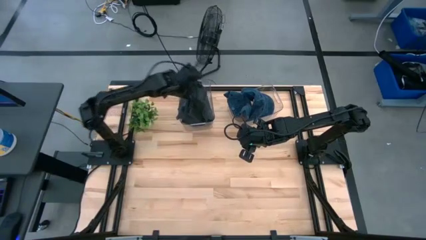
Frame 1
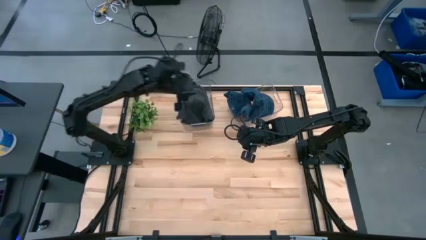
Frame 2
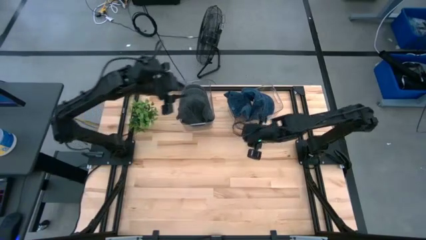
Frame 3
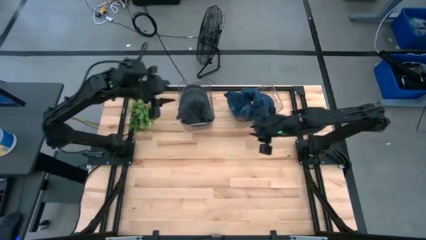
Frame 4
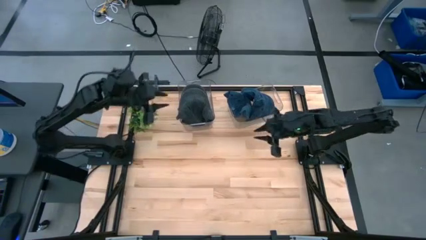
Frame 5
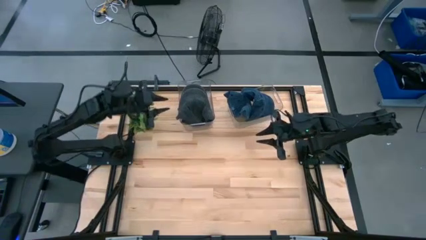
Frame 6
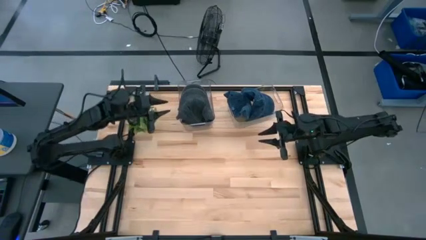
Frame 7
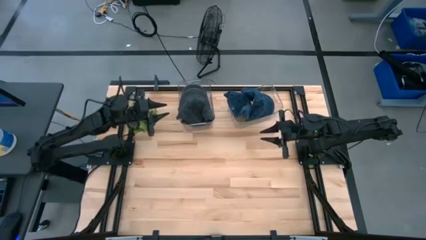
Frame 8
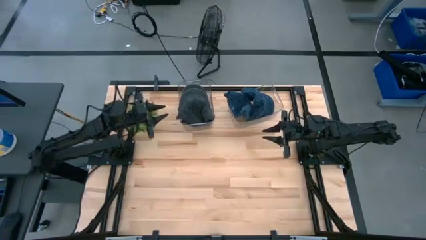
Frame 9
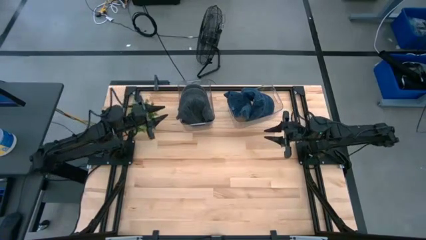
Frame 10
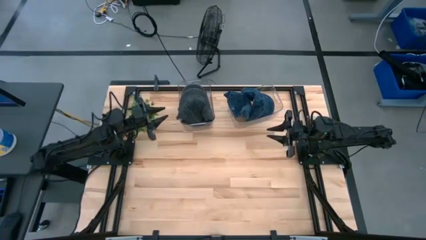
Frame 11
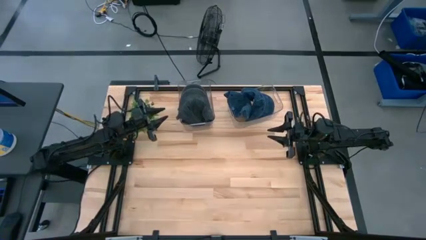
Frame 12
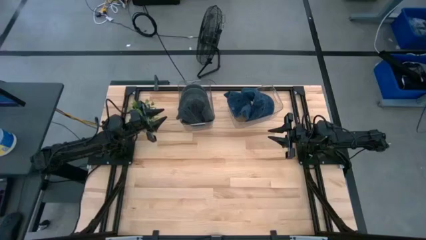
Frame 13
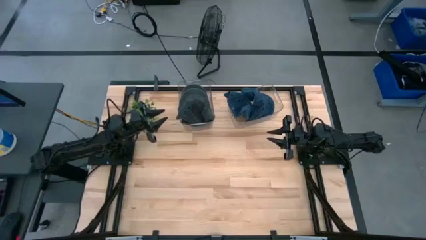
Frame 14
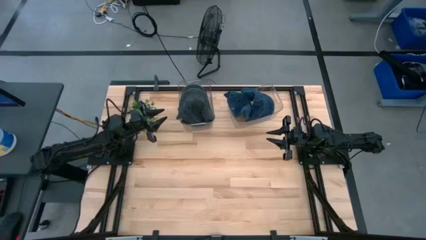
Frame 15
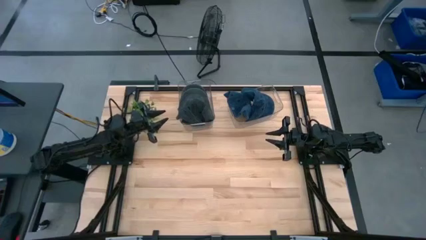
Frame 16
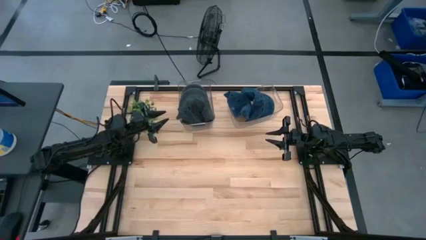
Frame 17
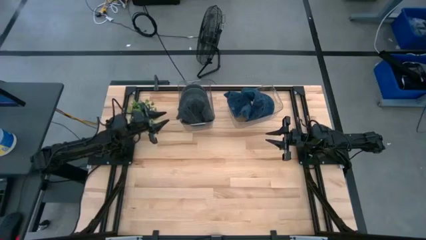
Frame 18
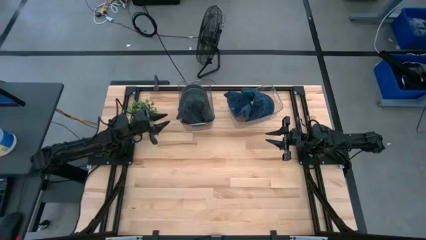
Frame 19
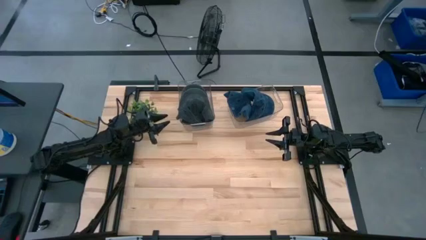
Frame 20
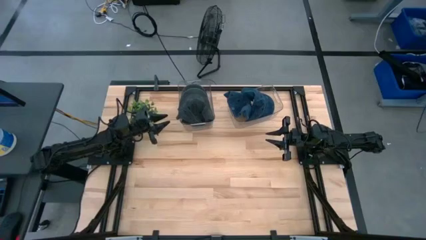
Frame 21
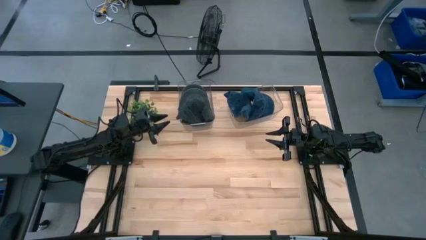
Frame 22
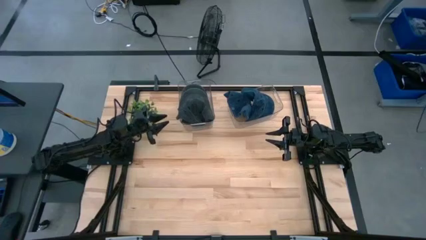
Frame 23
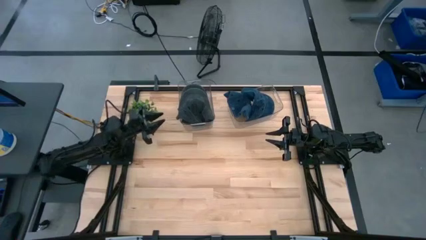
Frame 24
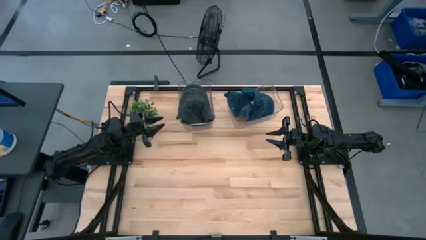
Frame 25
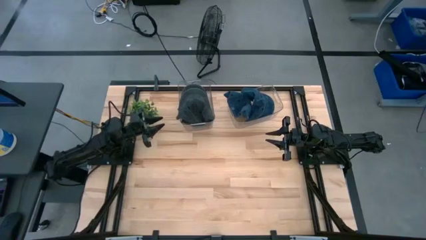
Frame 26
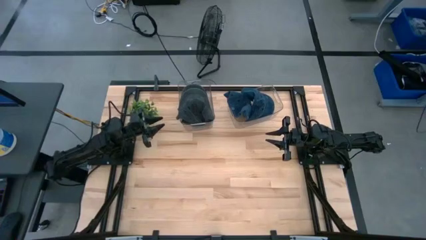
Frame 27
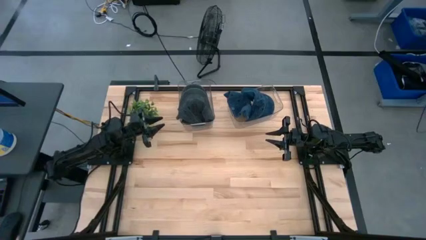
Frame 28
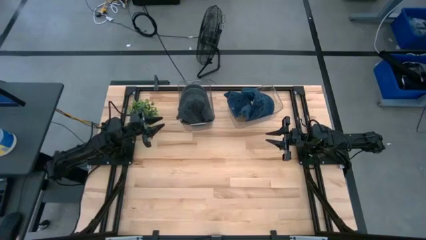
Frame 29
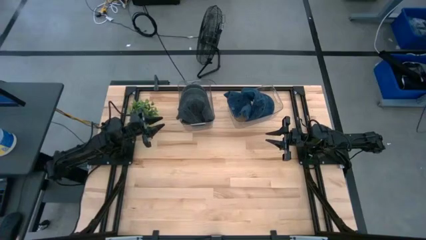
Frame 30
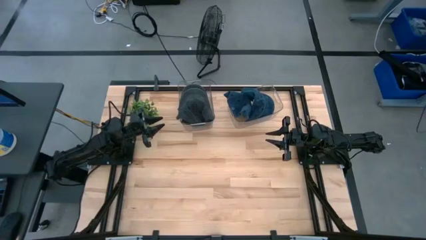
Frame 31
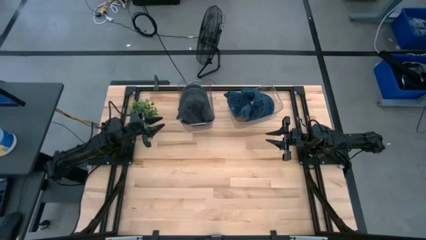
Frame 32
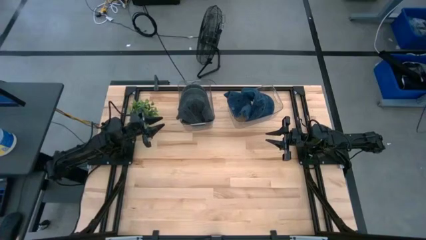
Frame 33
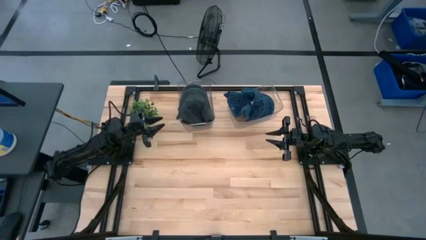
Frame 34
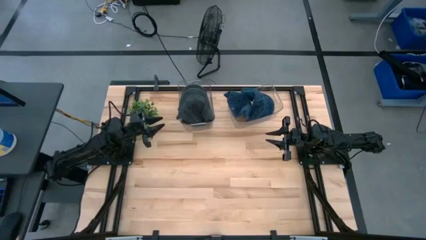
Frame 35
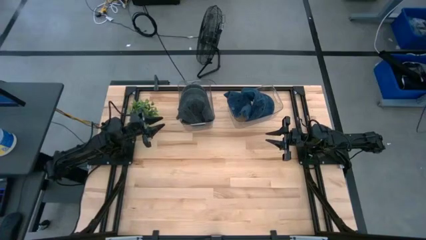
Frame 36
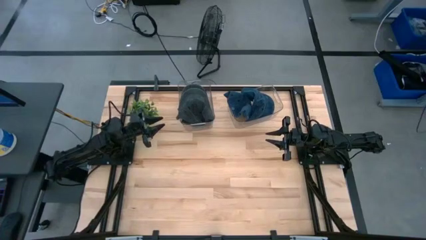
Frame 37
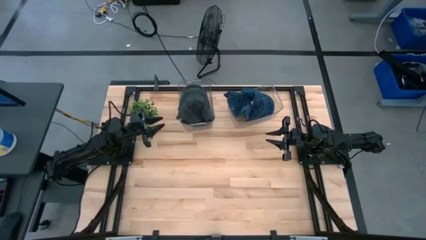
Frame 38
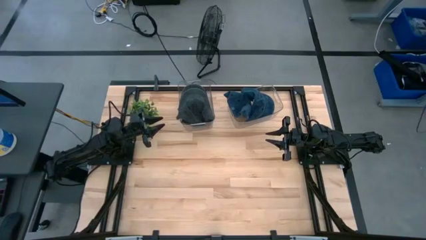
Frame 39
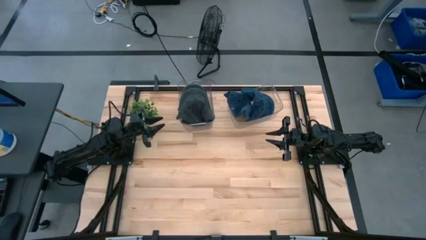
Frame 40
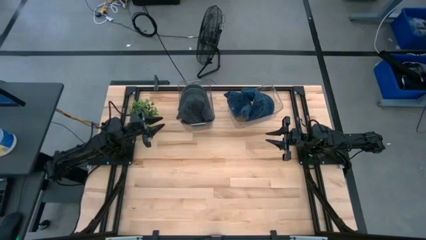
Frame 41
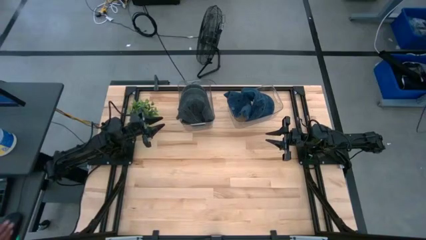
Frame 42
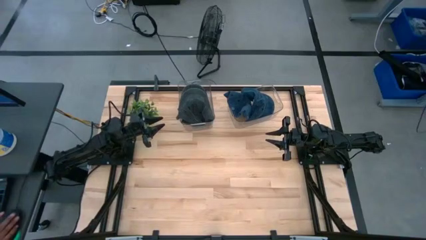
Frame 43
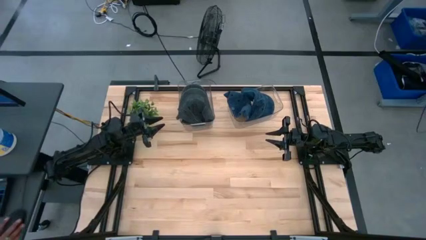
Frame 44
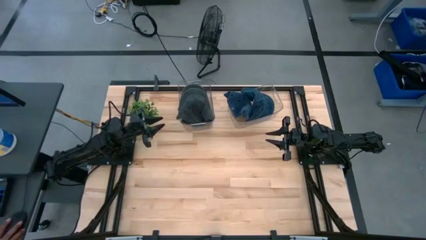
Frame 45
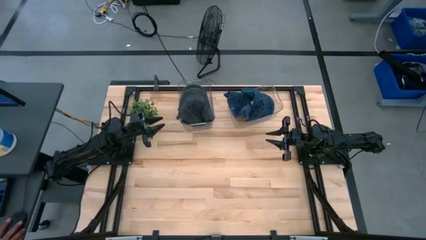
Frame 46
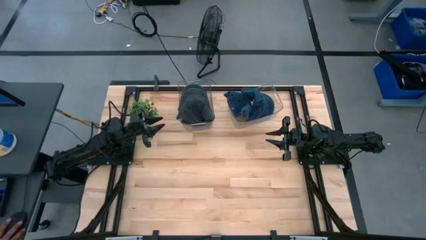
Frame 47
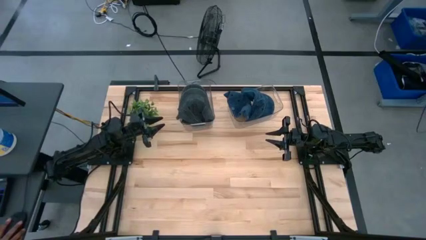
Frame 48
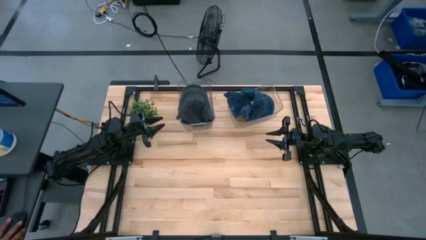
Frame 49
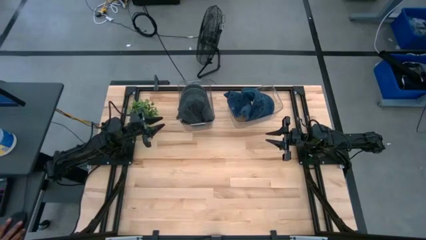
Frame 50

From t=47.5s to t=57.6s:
Task: Pick & Place hat
Return to Home Position

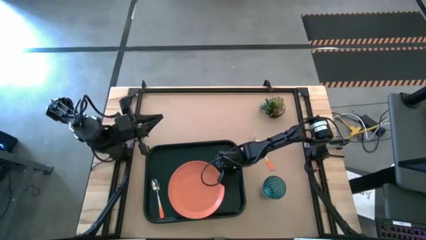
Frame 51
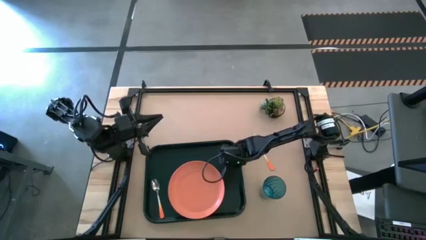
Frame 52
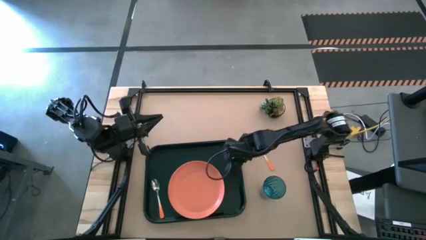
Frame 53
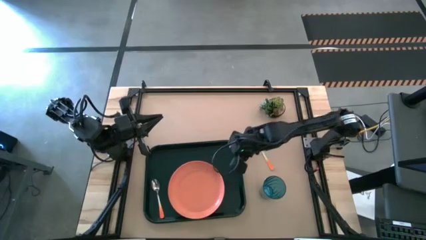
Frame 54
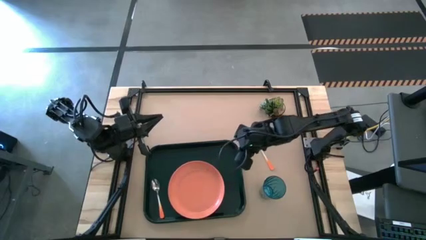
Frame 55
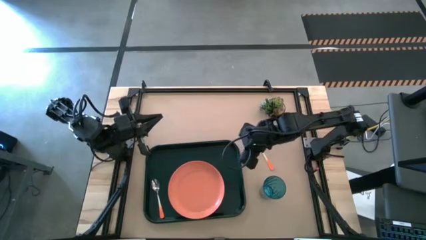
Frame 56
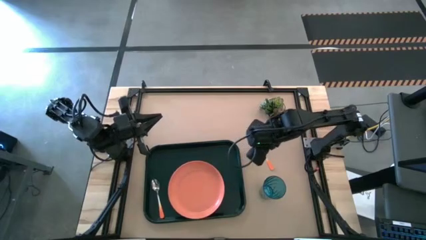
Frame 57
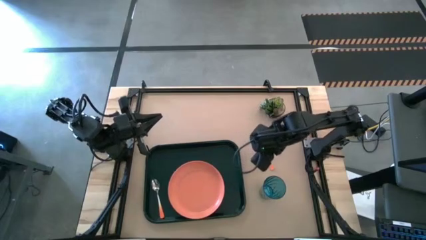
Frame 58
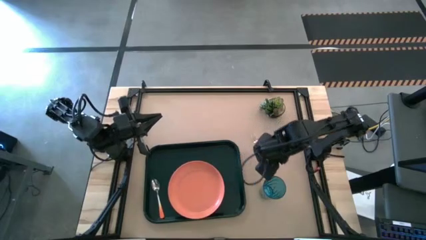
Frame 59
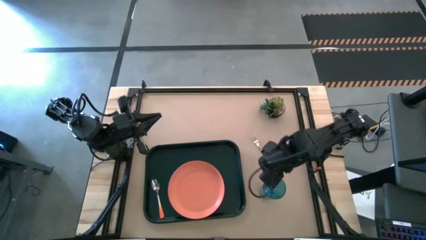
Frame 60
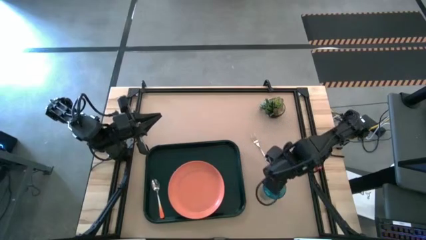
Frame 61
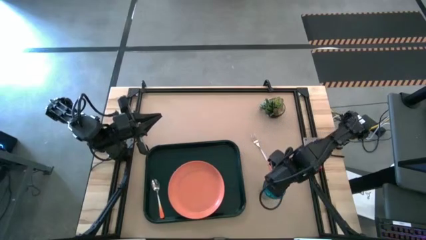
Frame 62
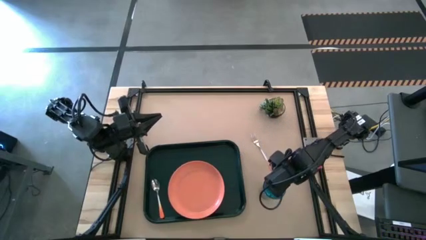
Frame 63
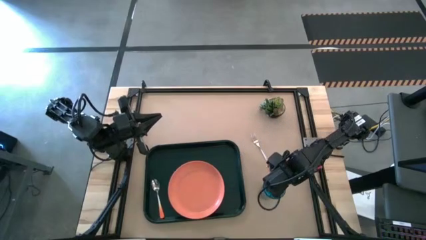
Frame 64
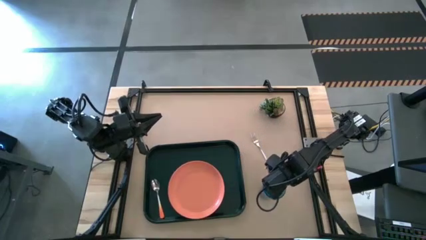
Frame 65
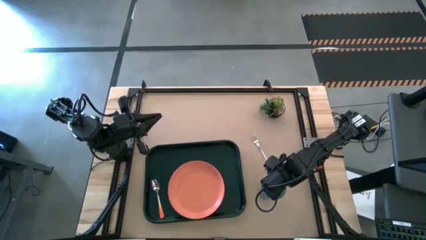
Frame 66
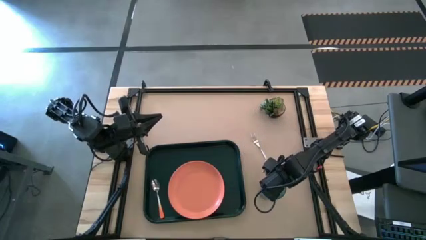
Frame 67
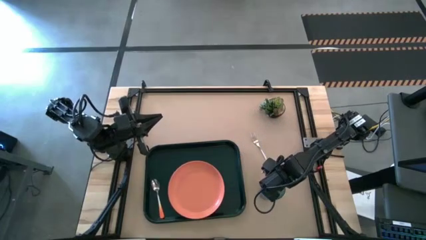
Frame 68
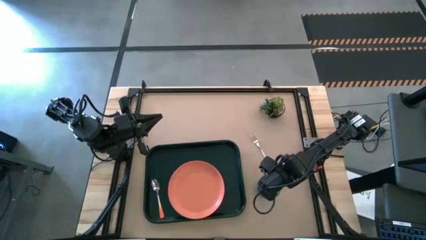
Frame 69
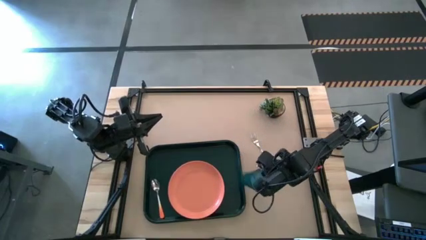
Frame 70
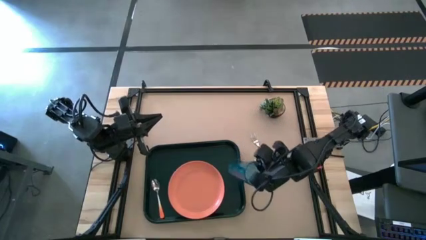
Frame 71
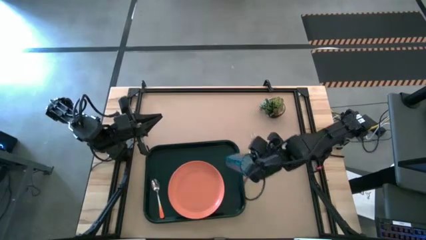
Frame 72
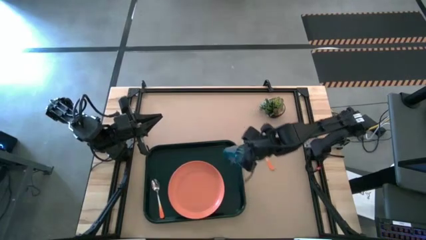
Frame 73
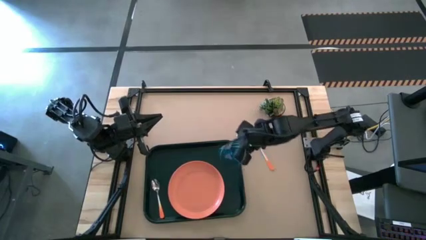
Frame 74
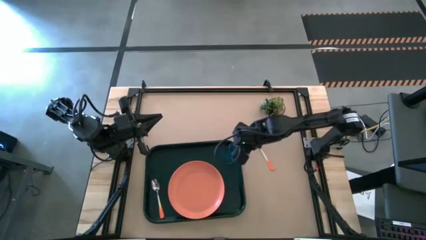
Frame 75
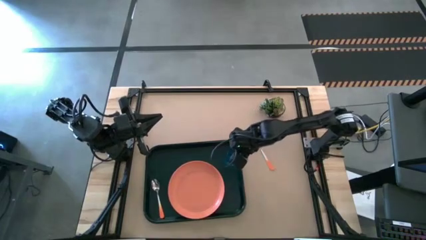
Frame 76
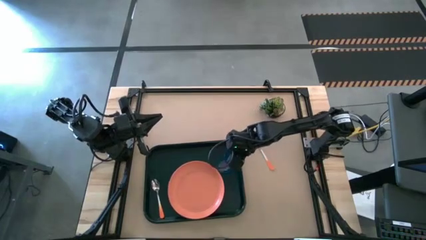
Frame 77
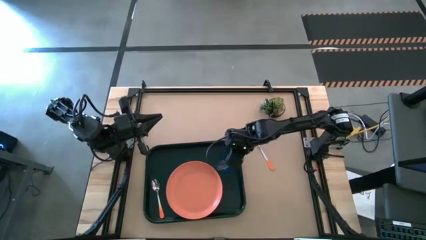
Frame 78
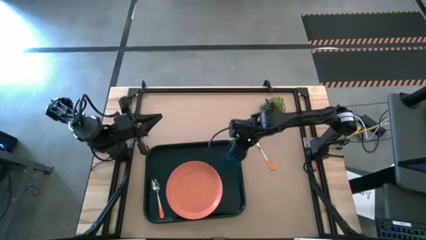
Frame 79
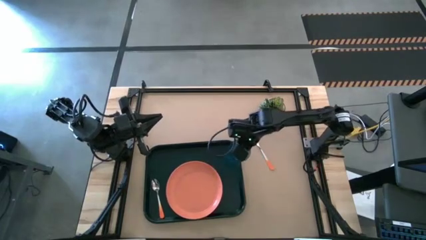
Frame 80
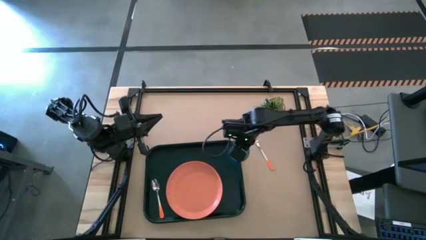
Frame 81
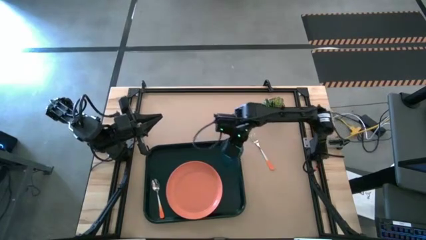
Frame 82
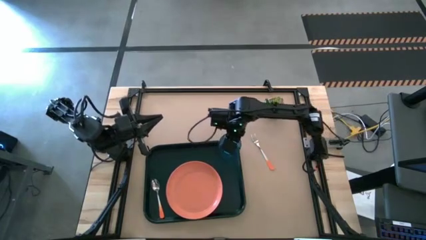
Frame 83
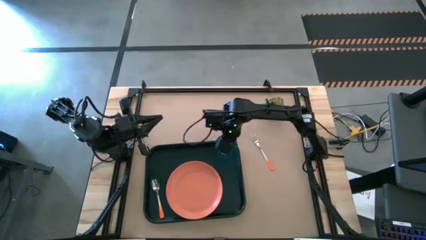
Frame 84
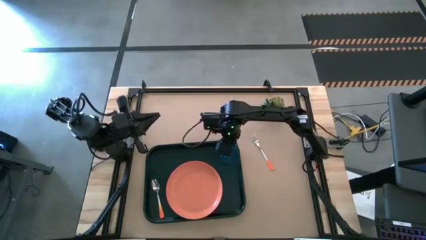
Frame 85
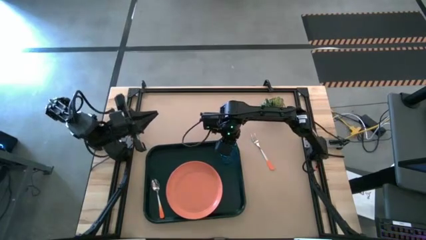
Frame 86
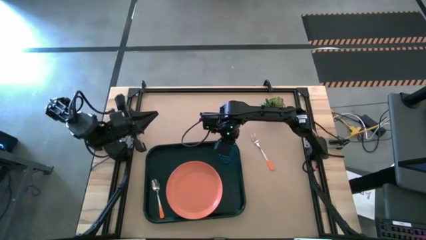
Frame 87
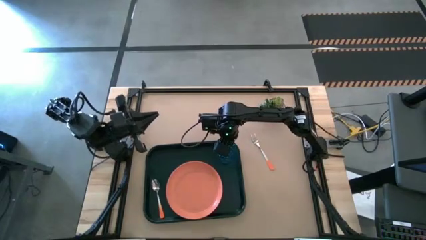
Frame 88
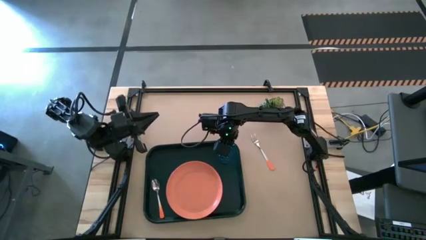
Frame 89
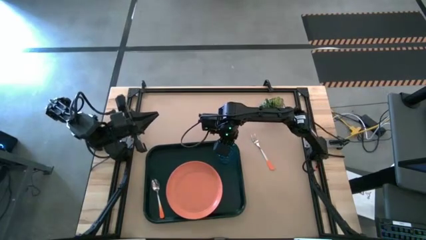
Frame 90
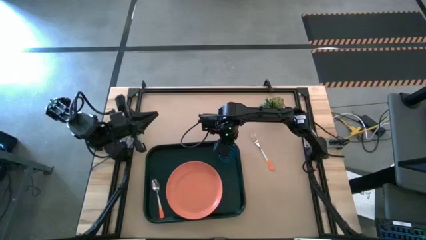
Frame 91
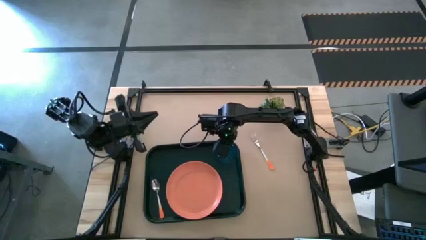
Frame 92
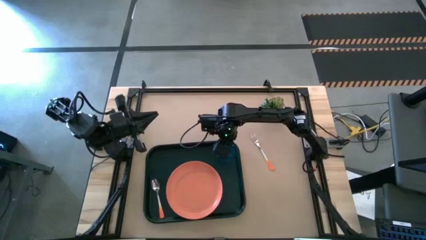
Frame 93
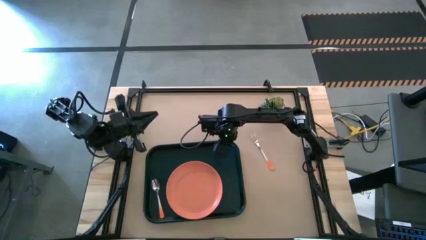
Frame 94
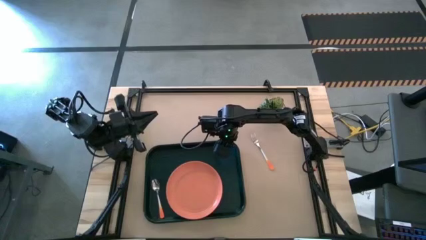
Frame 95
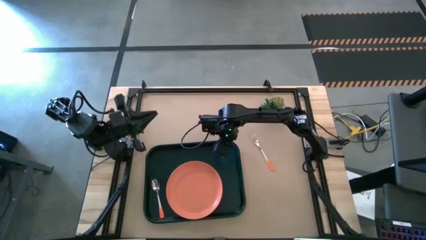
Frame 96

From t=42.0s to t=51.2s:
Task: Pick and place plate/cup/fork/spoon on tray
Put the blue transparent cup on the dark green tray
